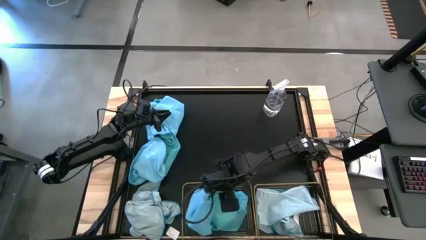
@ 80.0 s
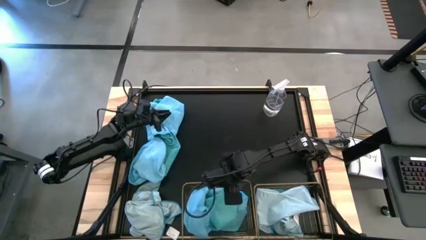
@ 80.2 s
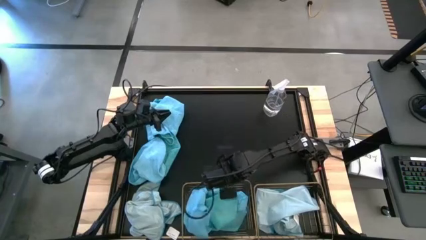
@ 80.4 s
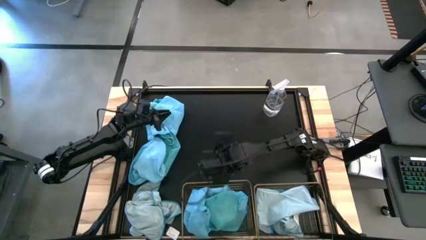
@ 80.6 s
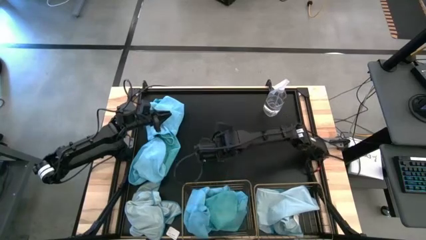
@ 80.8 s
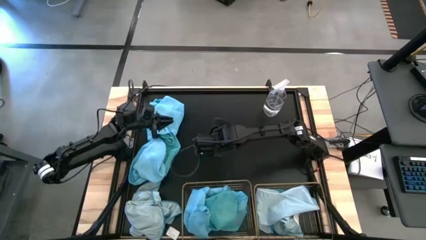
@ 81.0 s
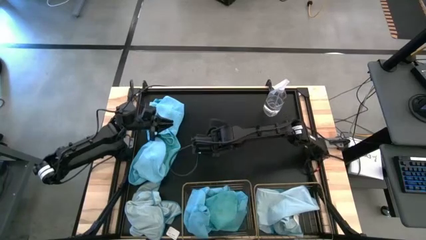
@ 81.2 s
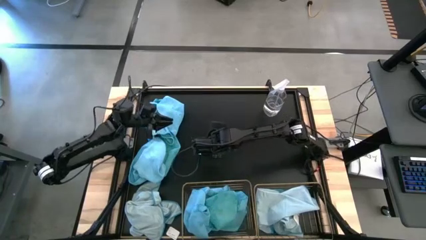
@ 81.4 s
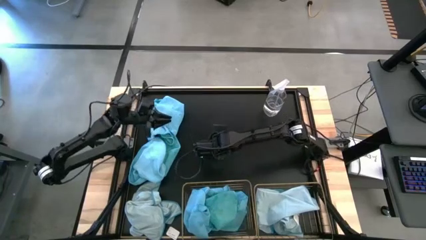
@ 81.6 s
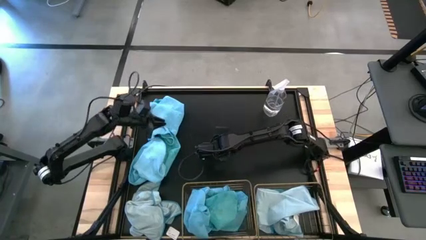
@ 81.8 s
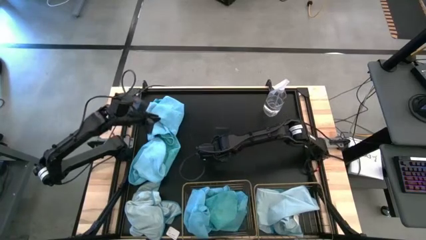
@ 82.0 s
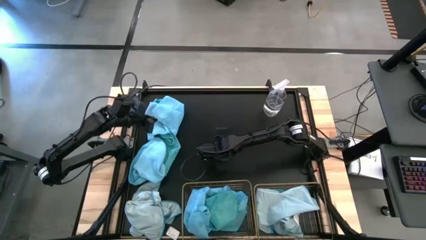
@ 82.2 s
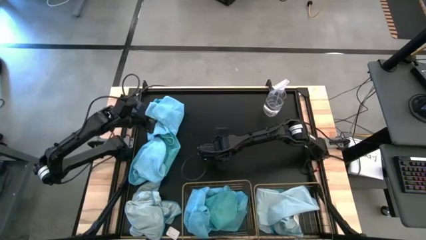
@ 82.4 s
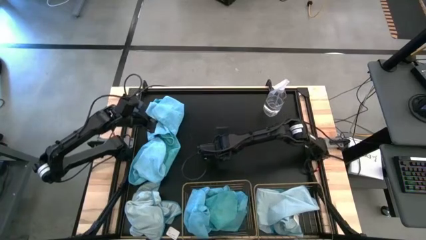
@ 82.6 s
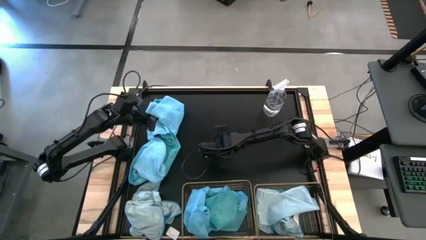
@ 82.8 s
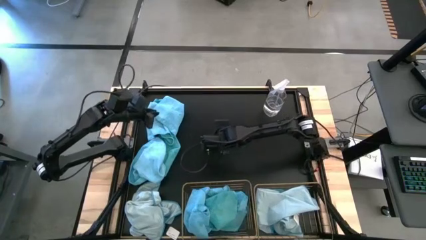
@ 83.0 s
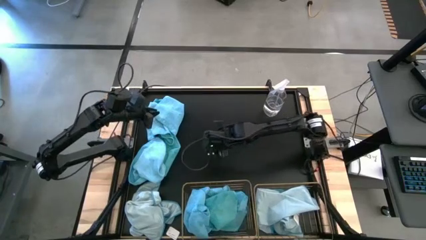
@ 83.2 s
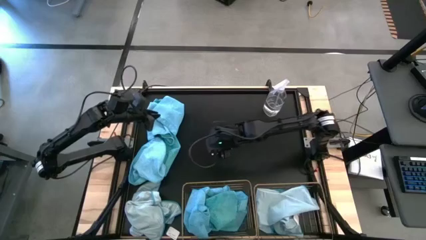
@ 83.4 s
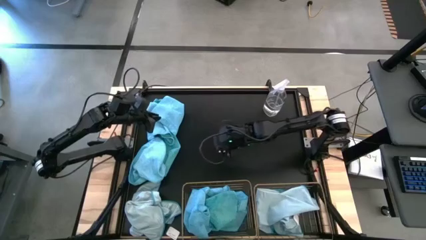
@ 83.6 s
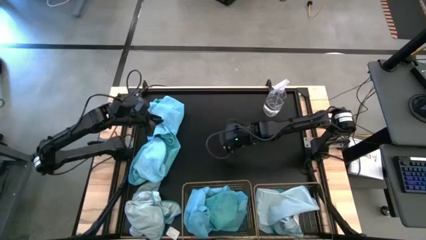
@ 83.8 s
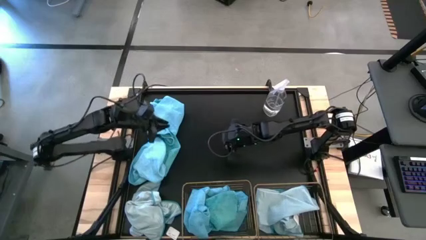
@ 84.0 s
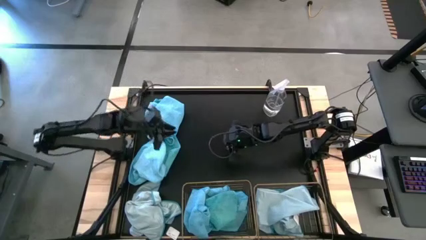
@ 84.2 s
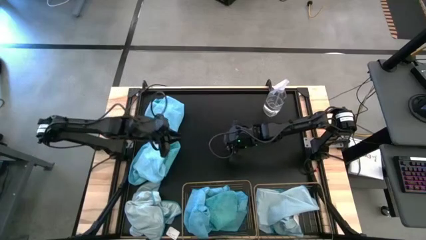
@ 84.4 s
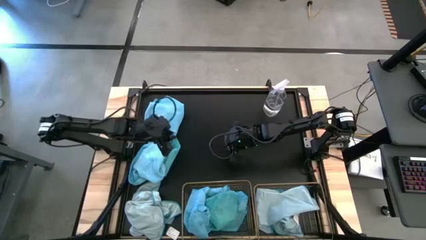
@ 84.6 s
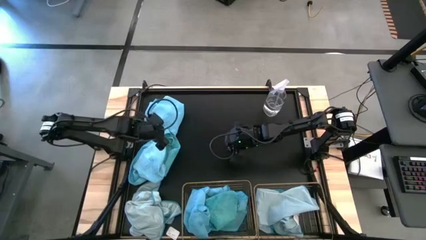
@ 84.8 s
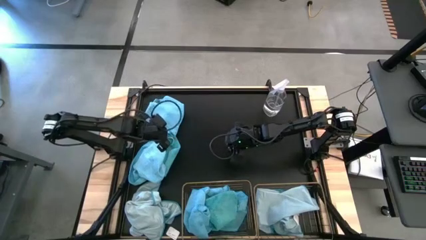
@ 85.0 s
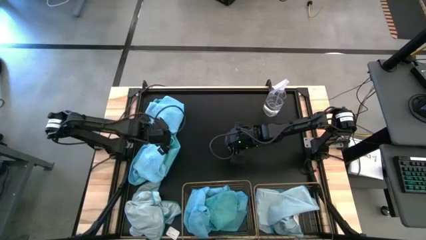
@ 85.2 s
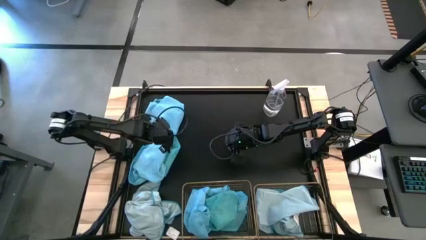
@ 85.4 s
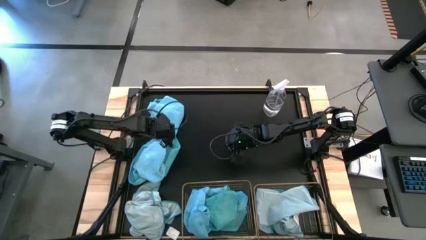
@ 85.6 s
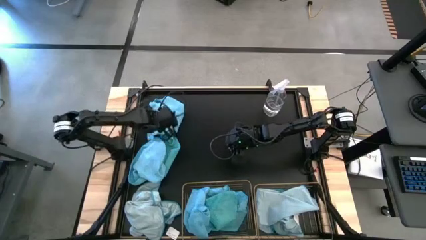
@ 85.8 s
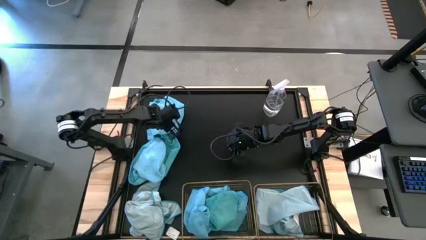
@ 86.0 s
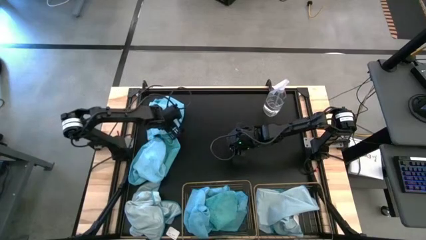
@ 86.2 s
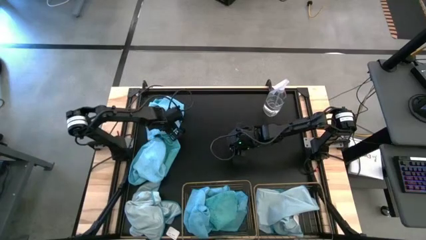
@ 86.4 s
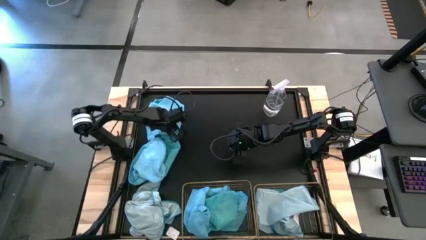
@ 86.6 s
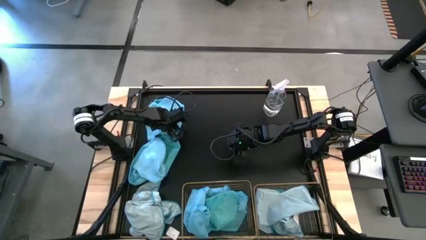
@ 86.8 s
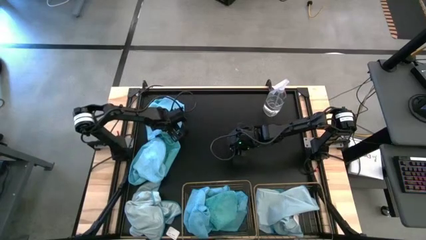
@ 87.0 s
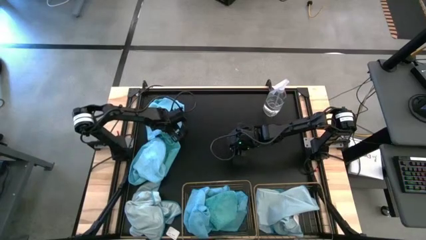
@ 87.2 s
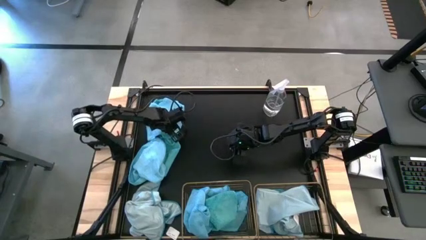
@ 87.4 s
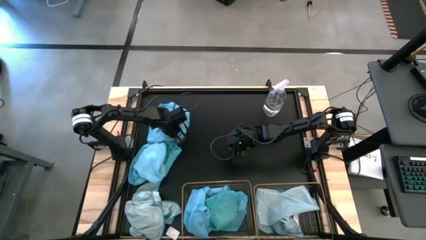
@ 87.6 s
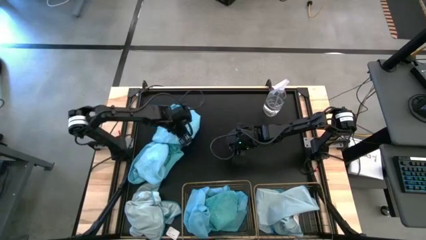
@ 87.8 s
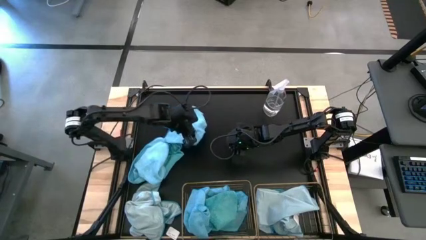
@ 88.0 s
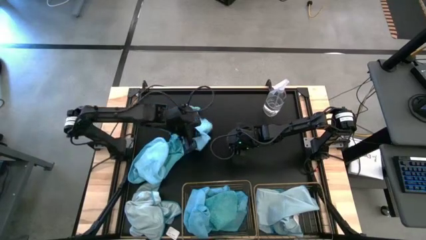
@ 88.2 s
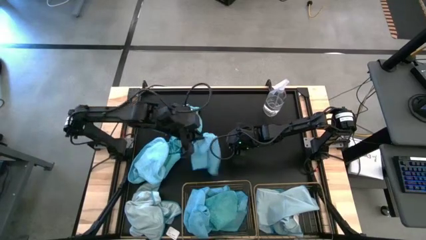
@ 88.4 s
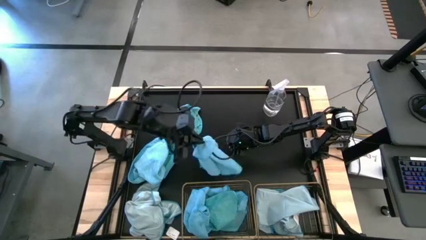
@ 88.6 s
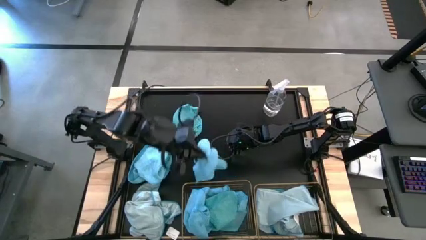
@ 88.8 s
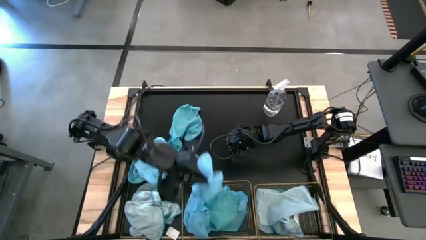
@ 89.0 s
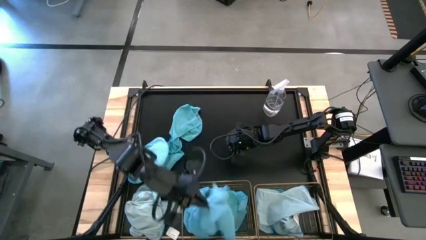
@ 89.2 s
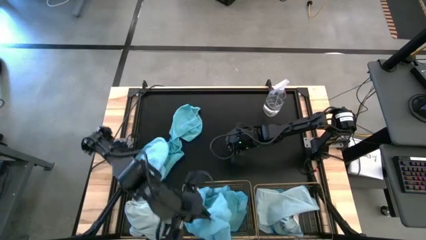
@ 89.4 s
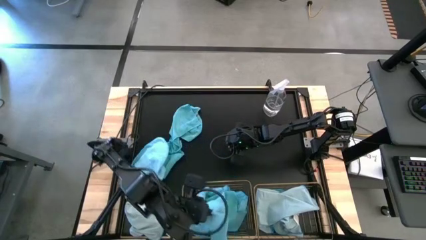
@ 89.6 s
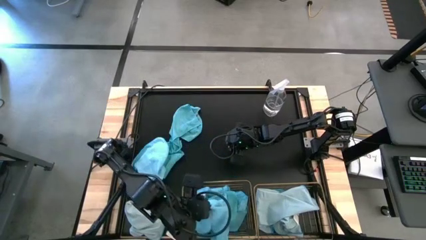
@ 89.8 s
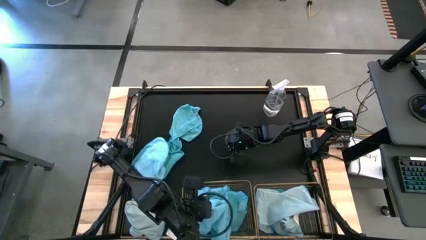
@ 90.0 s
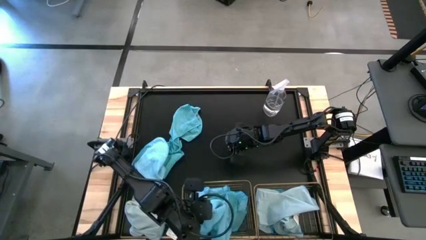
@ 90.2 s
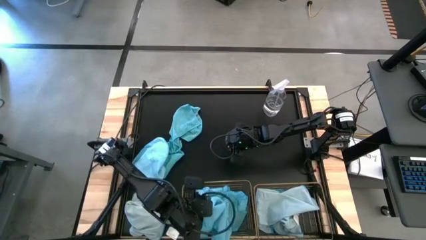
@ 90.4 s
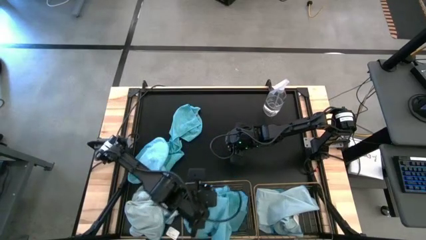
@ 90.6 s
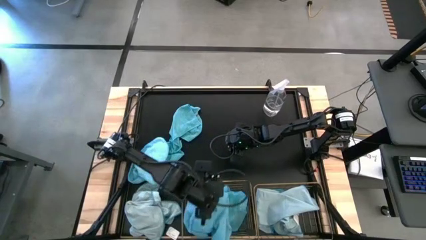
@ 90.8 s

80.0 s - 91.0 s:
Task: Sort microfiber towel by color & place in baskets
Put the blue towel into the left wire basket

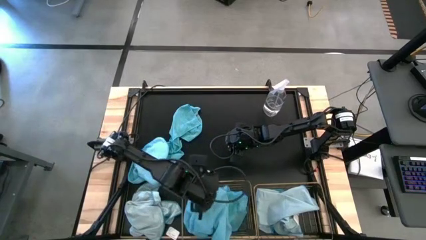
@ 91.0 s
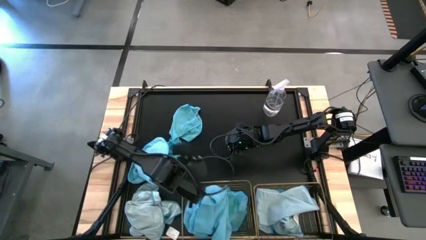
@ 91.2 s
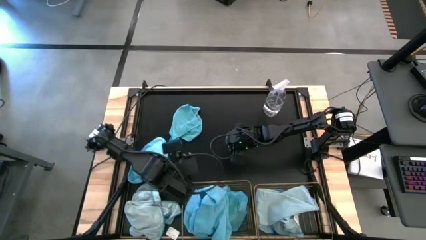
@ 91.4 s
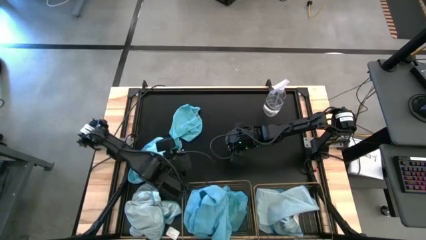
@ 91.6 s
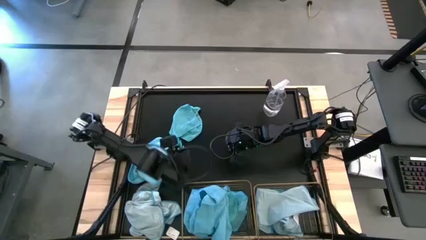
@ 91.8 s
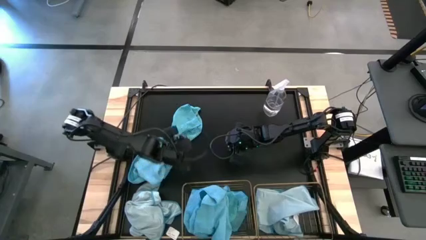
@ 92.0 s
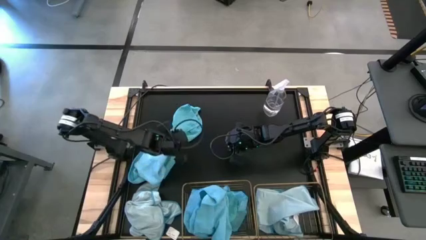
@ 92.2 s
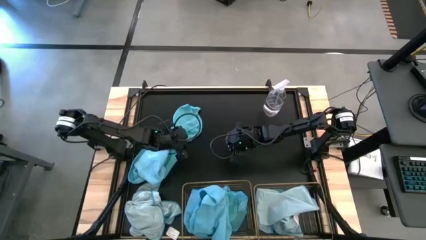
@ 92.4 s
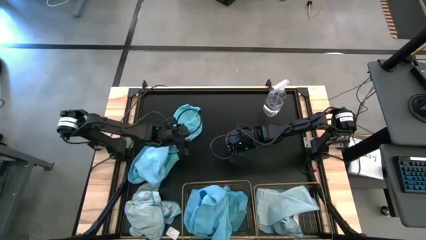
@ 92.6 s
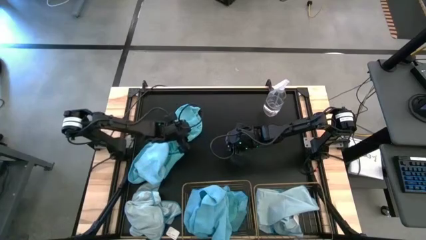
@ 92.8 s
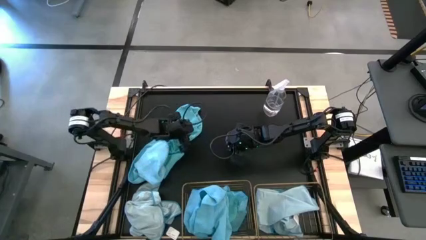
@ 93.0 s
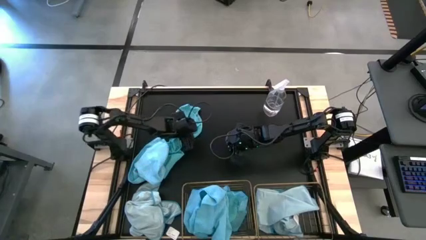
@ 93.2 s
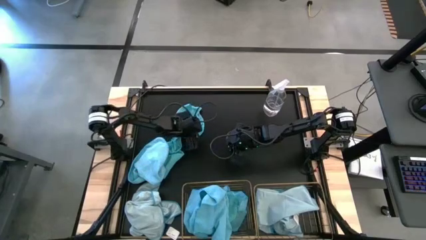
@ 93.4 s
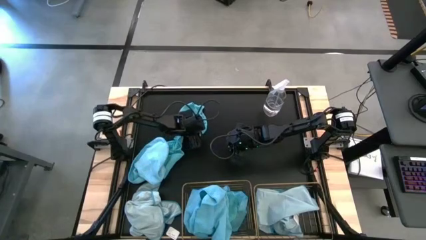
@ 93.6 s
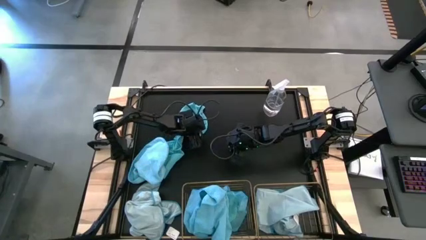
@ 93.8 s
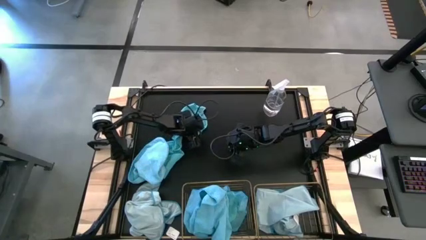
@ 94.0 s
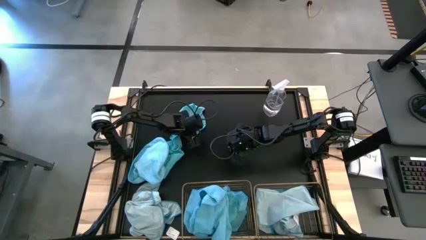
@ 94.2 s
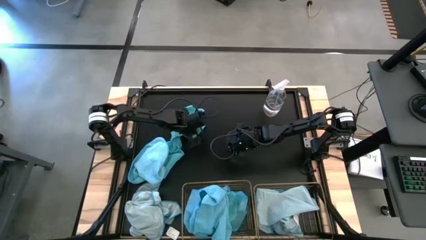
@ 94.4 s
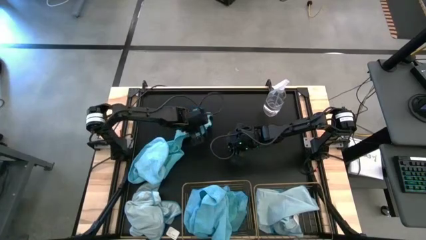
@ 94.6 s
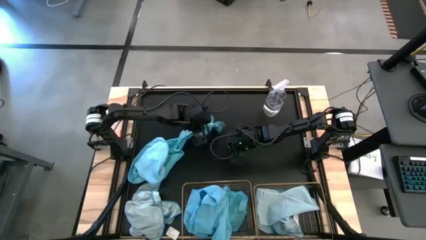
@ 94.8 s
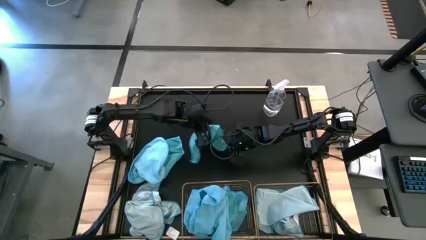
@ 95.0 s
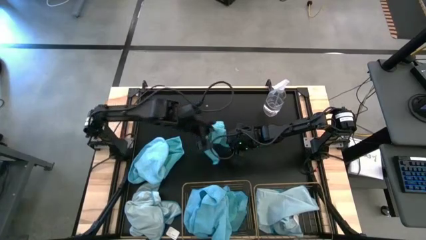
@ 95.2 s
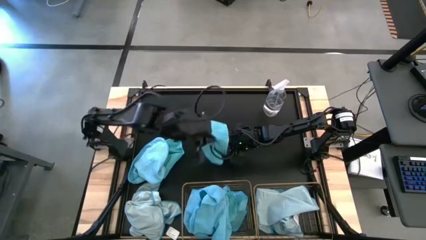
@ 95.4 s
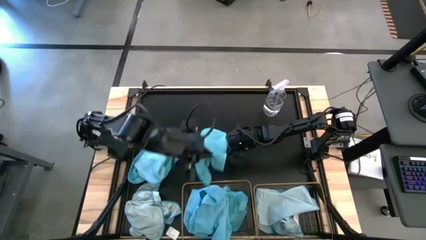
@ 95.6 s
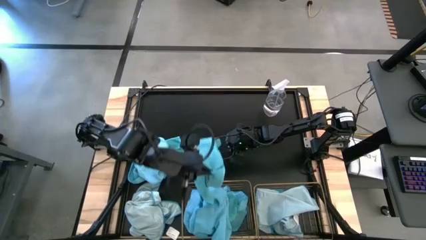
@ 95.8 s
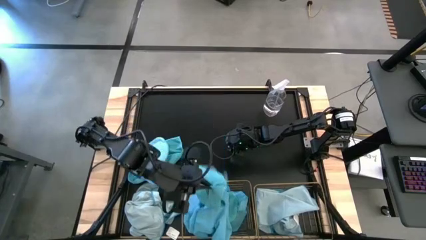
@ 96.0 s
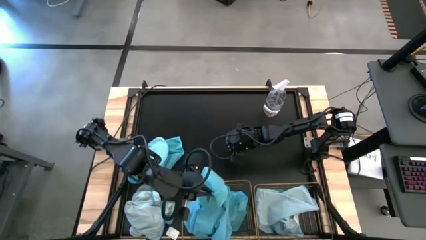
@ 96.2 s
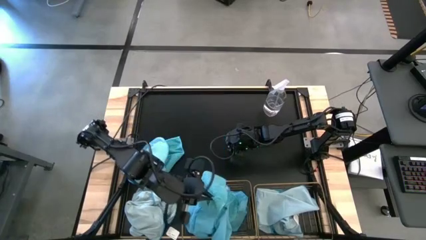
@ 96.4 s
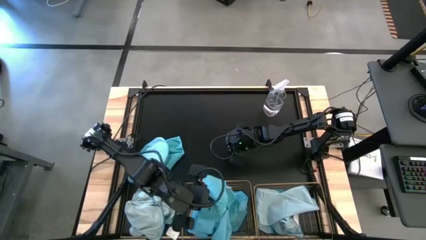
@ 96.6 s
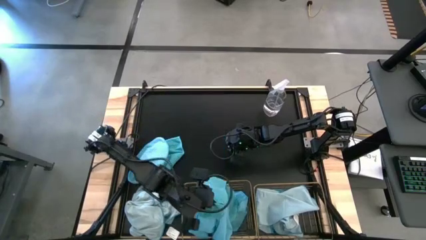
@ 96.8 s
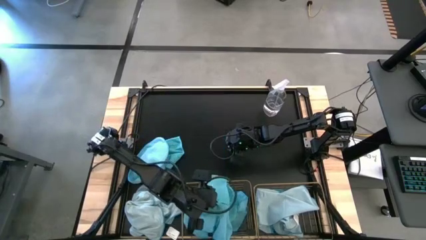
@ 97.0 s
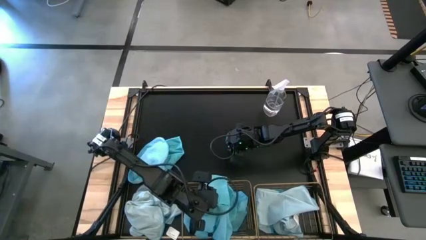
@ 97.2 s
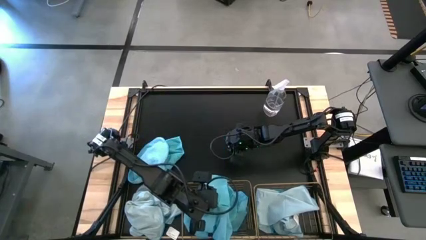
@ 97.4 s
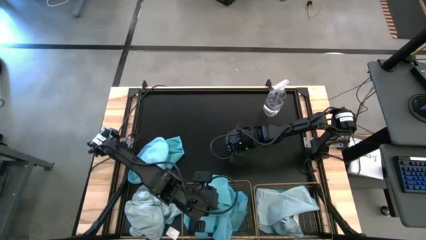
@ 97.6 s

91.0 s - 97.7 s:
Put the blue towel into the left wire basket
